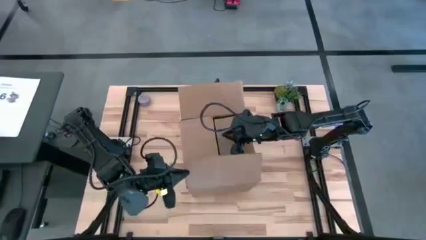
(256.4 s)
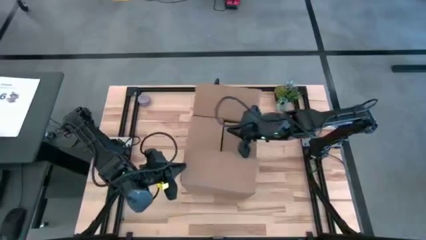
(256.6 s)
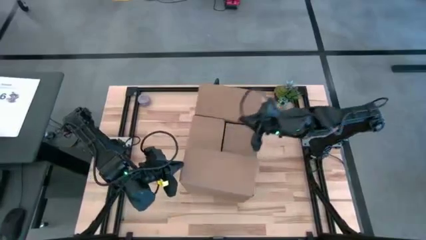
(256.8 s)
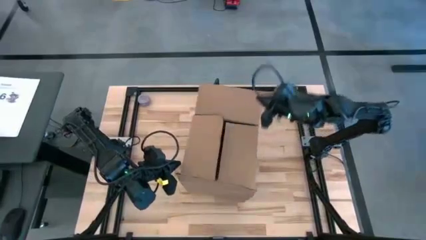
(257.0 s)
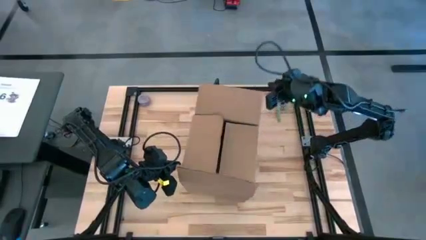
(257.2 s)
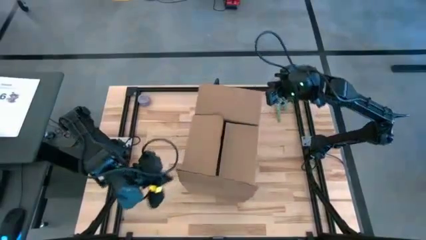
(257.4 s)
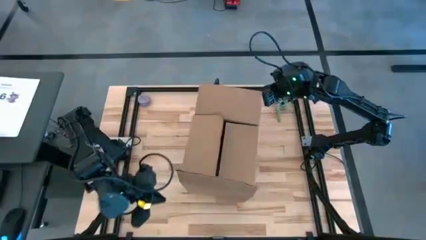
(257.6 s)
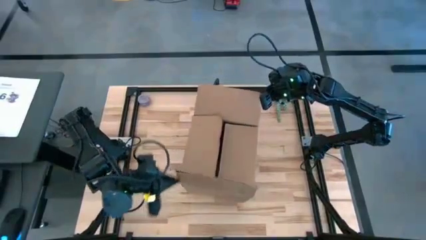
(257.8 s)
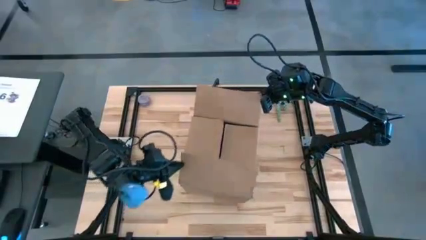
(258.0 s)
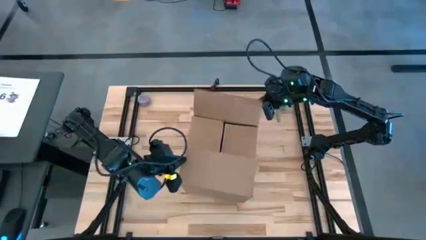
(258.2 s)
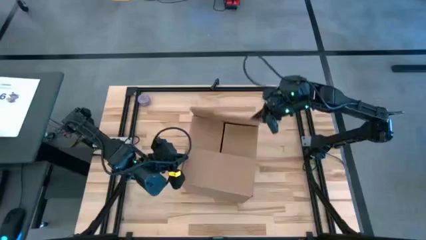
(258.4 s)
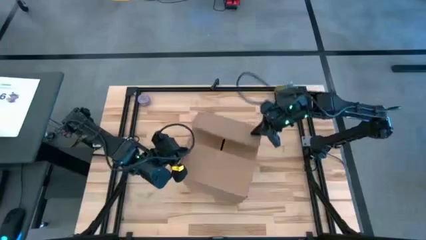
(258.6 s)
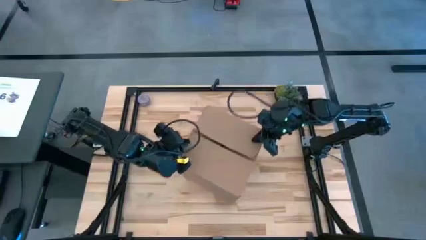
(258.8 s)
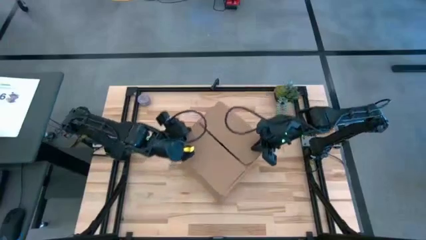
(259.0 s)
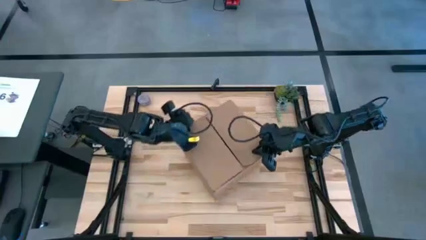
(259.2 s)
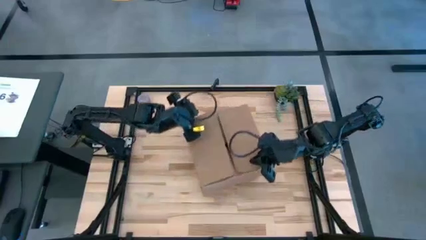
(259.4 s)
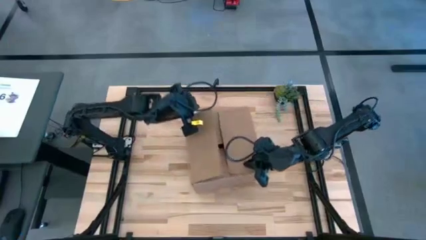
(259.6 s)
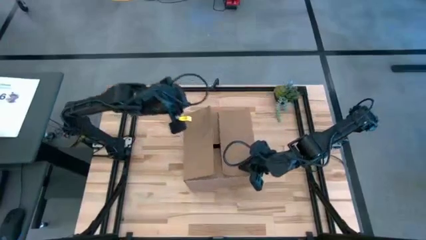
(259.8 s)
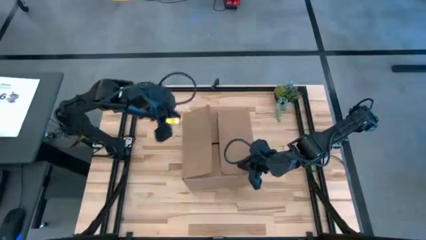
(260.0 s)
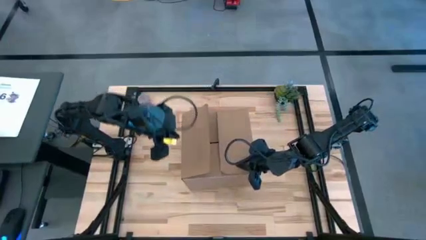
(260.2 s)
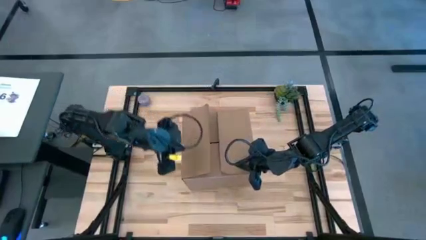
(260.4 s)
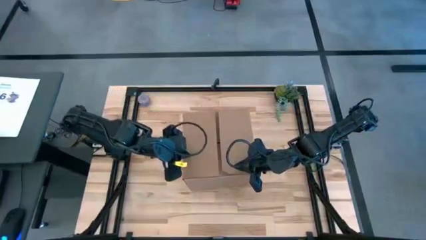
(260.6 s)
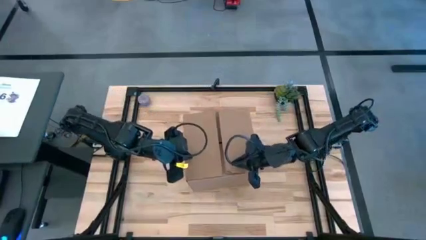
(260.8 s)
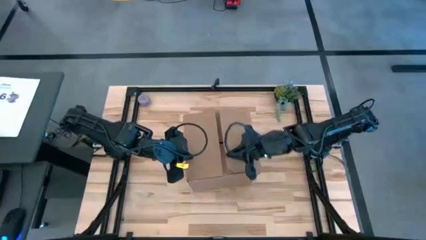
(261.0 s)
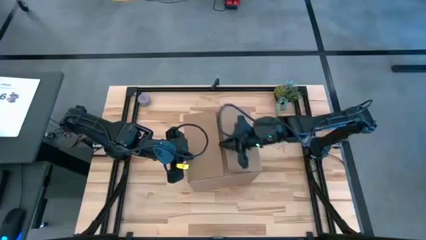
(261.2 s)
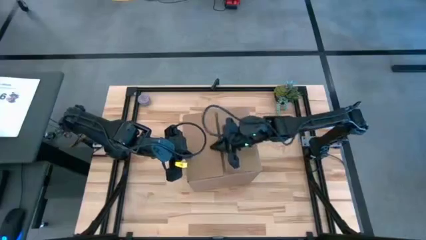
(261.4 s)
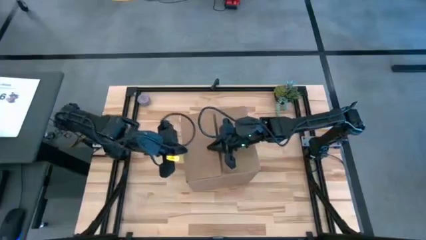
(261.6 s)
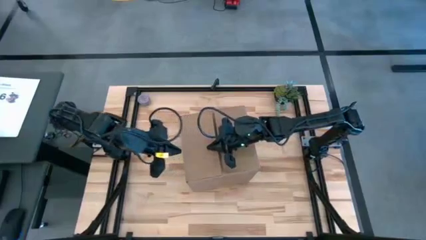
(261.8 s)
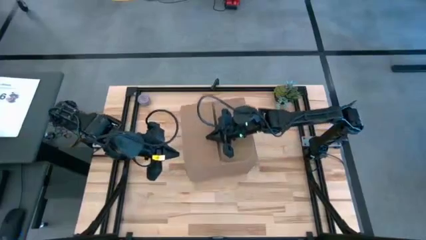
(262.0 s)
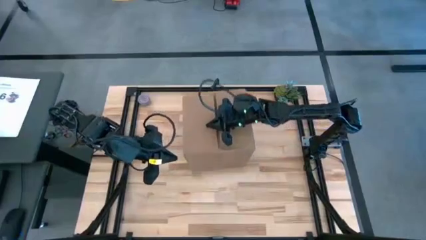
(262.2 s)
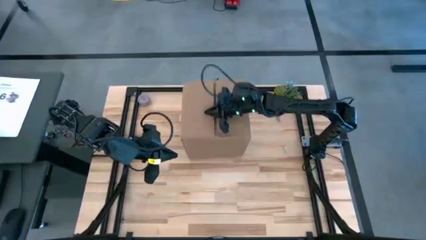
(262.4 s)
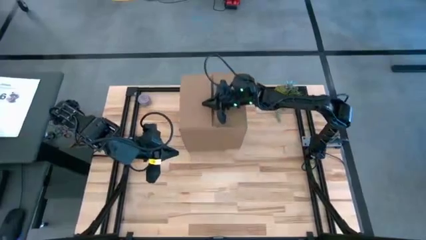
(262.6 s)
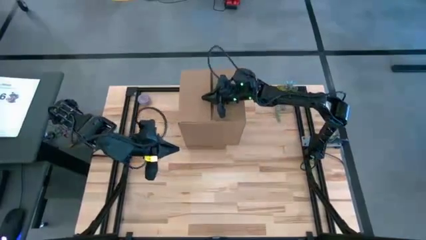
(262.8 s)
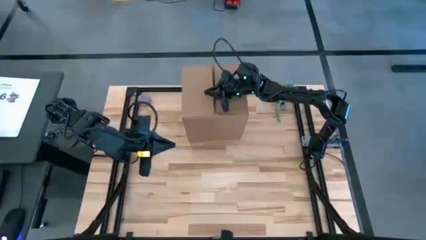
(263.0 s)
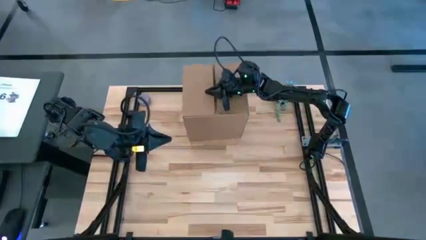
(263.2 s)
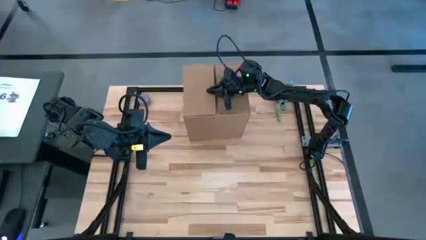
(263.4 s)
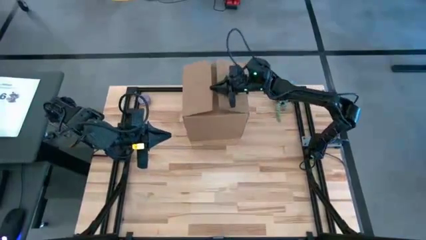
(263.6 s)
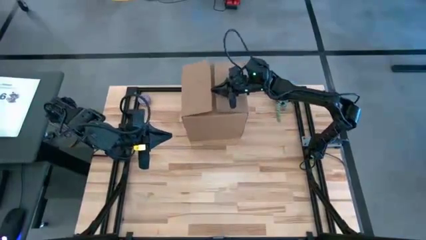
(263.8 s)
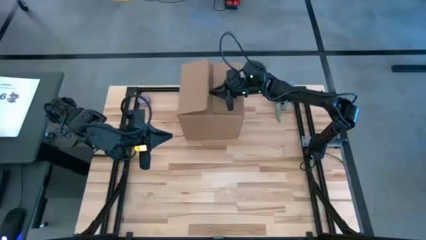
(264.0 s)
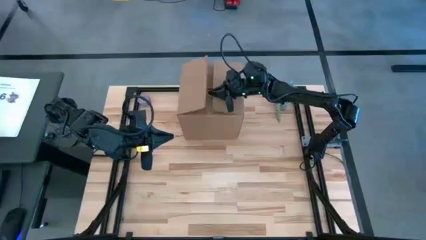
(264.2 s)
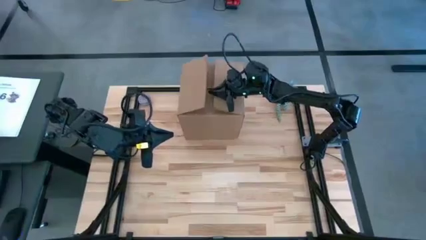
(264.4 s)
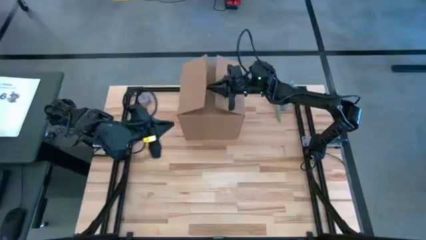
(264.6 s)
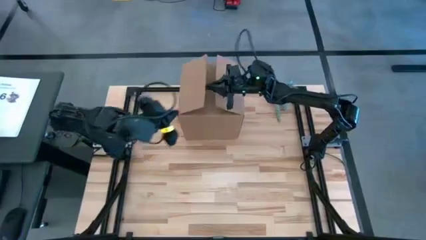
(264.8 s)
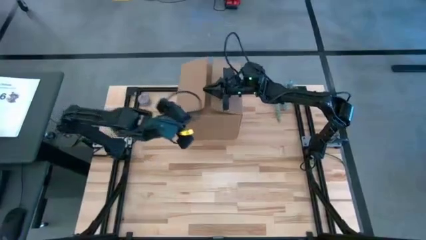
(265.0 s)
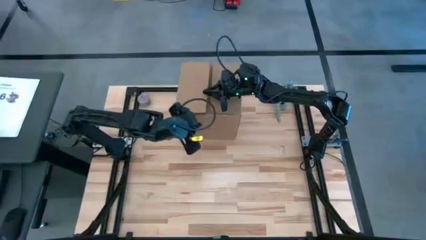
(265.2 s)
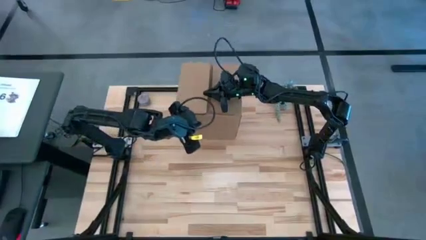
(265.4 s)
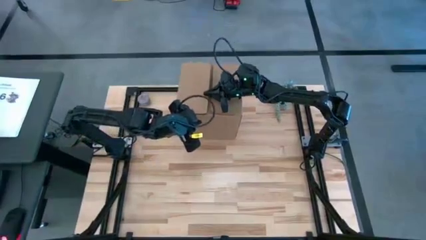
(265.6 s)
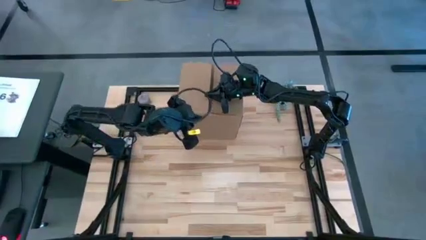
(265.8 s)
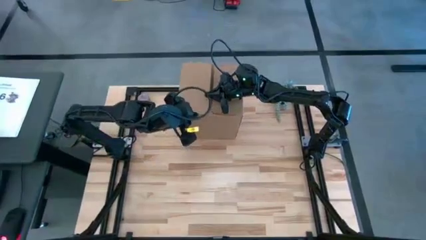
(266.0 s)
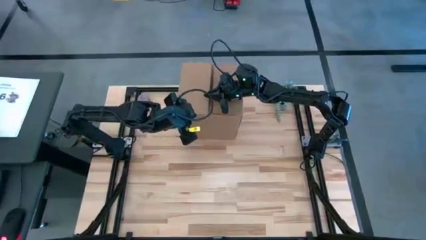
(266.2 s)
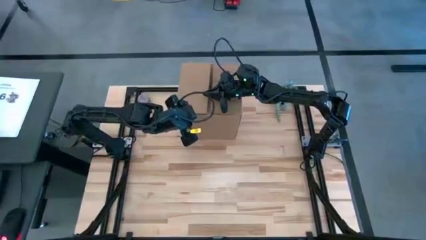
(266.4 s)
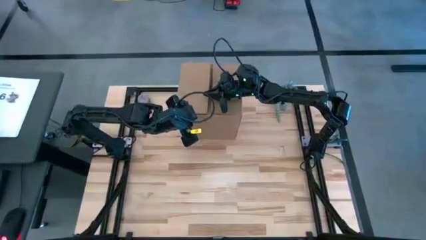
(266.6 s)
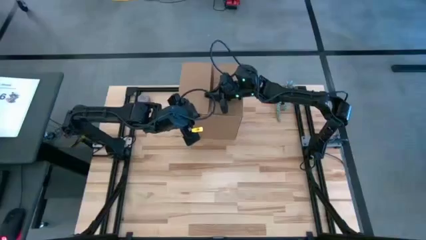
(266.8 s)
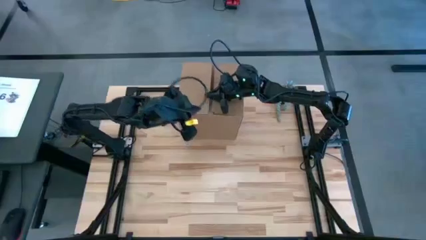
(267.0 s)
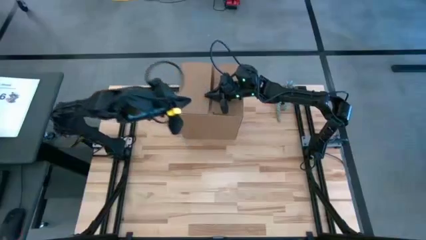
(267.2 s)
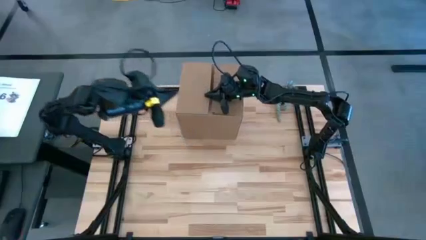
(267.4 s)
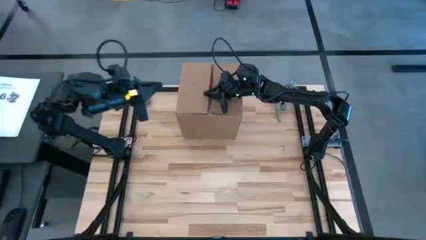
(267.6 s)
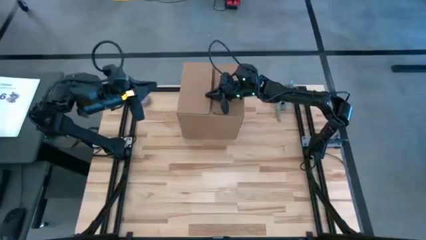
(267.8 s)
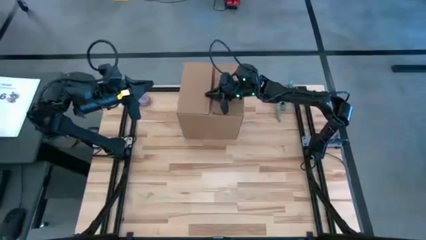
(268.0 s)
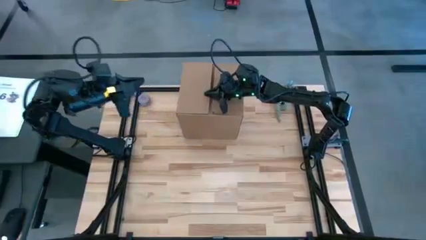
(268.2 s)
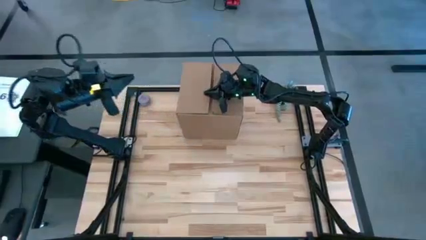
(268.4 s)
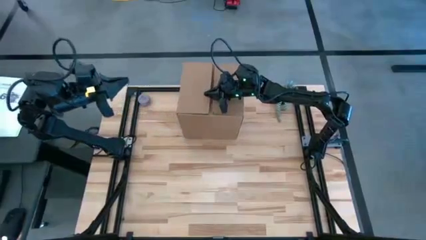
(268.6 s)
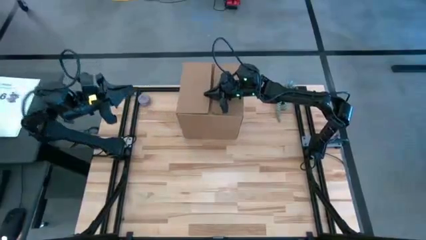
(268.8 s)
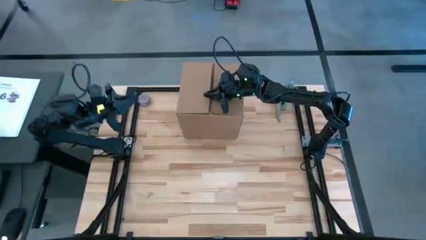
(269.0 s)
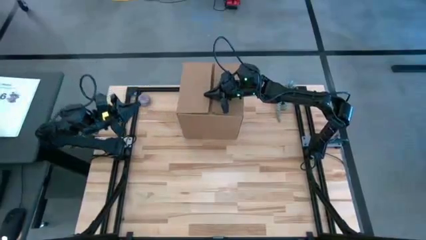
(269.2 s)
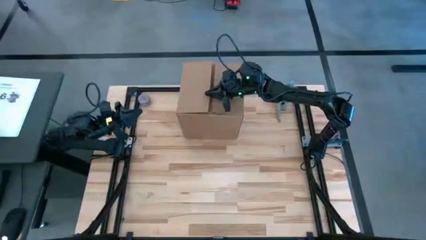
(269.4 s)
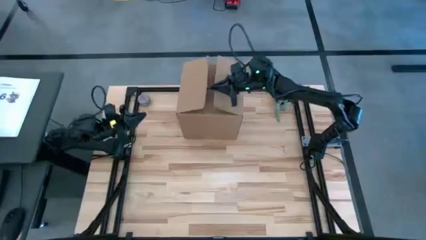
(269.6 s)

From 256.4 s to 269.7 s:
Task: wrap mug
Close the cardboard box

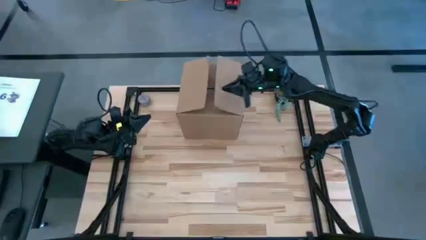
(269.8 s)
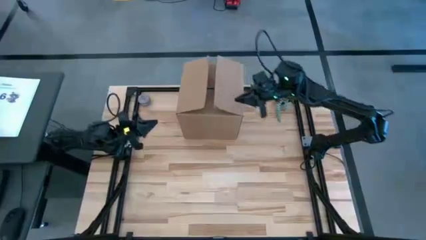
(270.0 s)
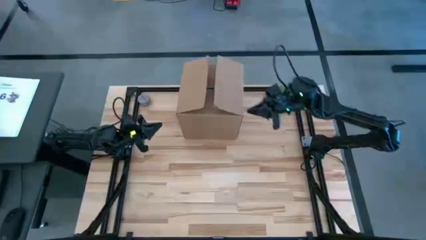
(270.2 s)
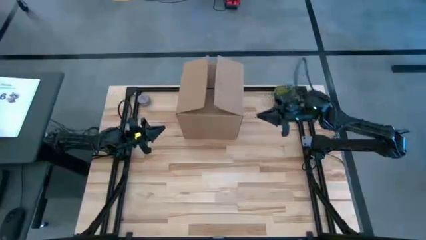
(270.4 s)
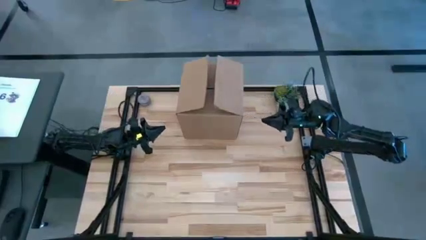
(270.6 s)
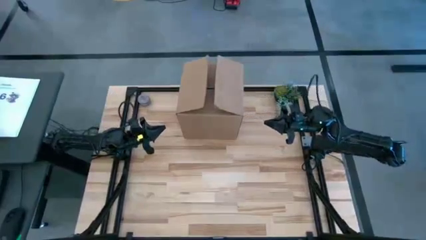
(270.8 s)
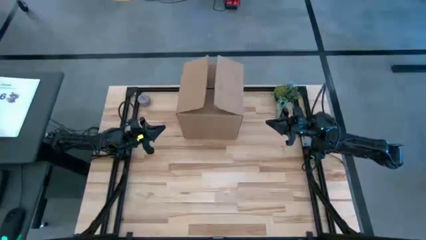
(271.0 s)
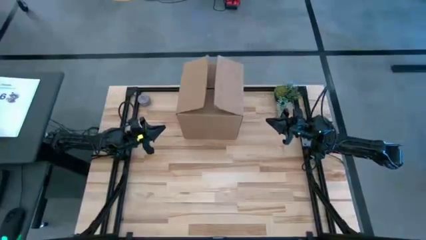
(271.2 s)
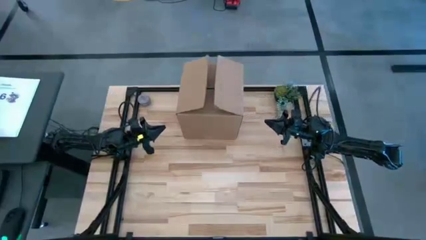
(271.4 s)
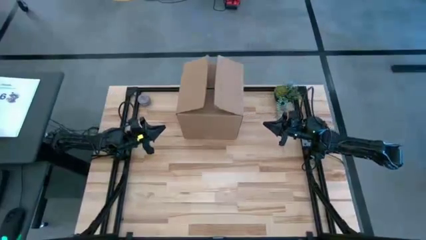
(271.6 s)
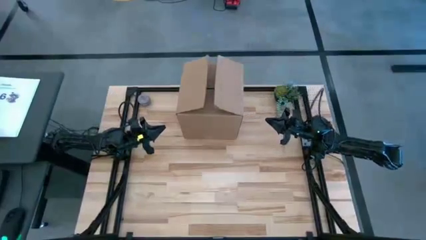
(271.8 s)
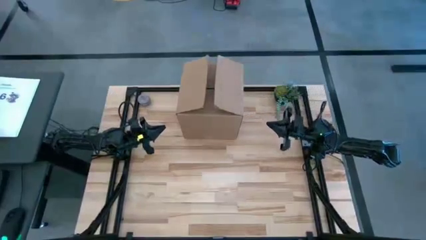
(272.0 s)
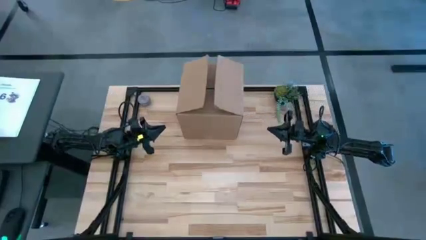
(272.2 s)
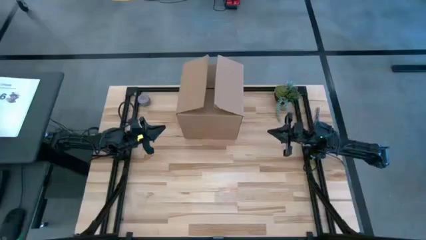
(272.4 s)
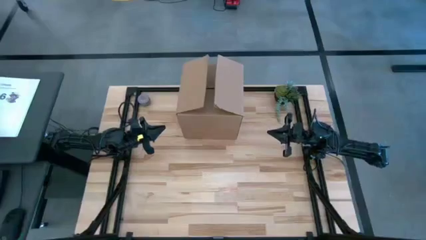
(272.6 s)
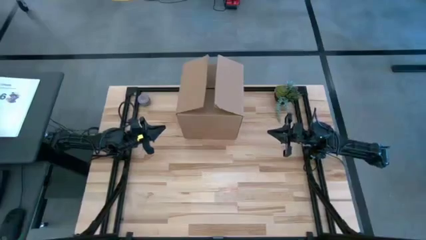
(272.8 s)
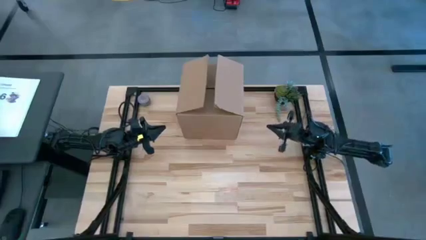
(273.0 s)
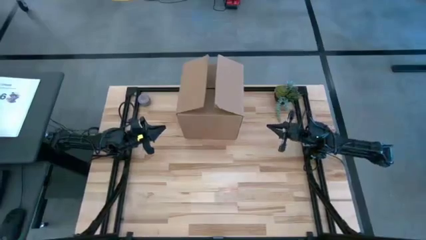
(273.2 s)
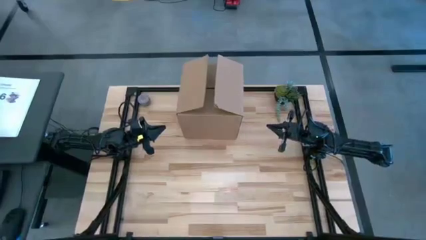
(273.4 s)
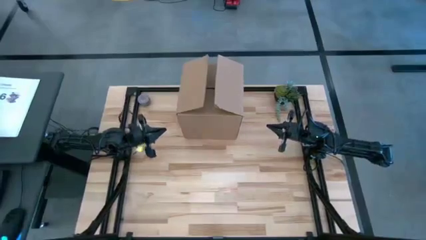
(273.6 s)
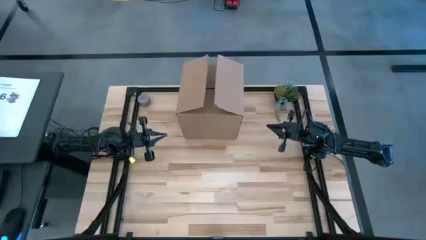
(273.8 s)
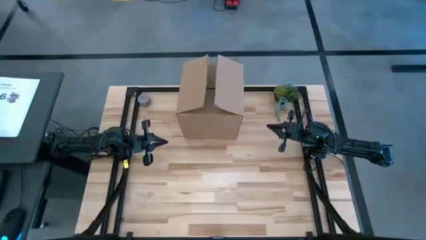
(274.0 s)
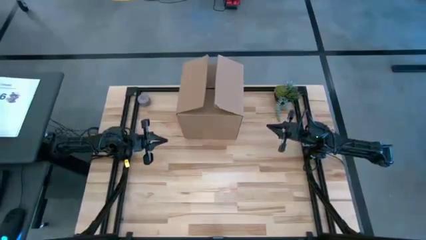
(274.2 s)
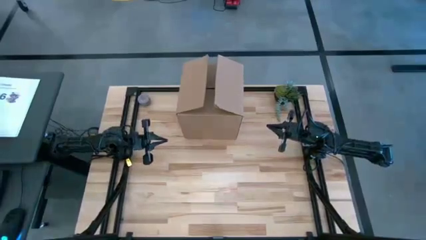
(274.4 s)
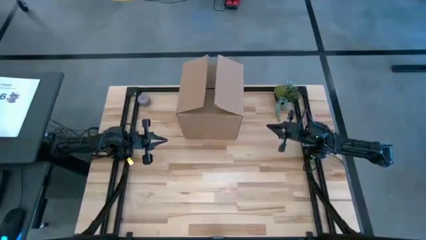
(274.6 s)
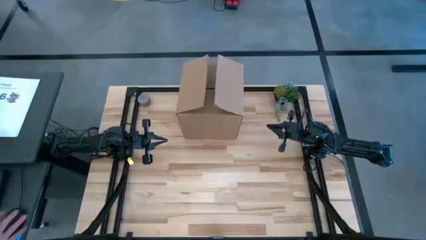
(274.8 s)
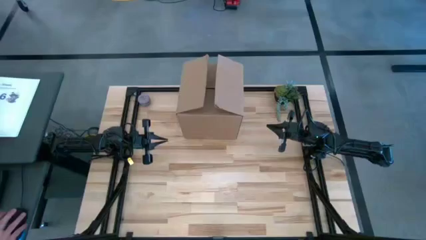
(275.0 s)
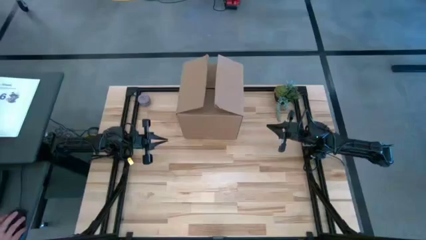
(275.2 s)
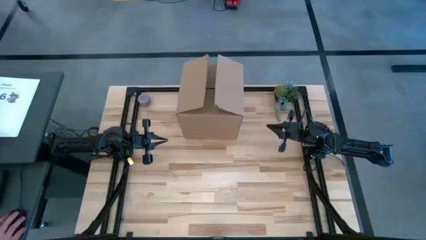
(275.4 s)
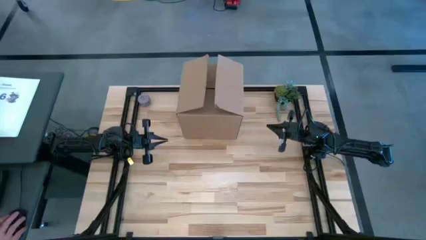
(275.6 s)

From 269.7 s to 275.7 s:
Return to Home Position
